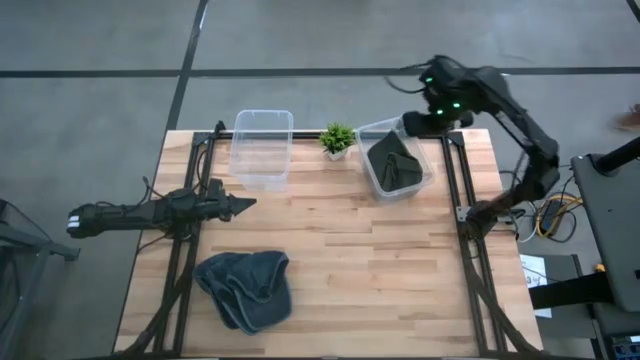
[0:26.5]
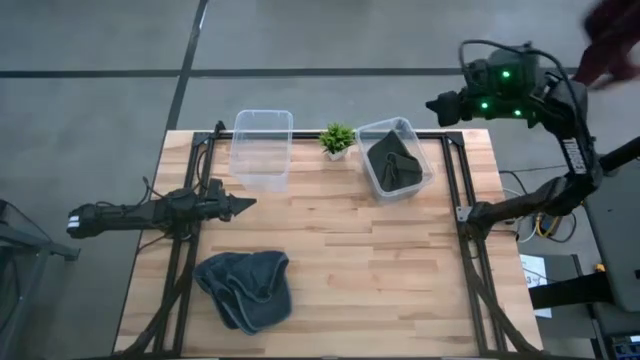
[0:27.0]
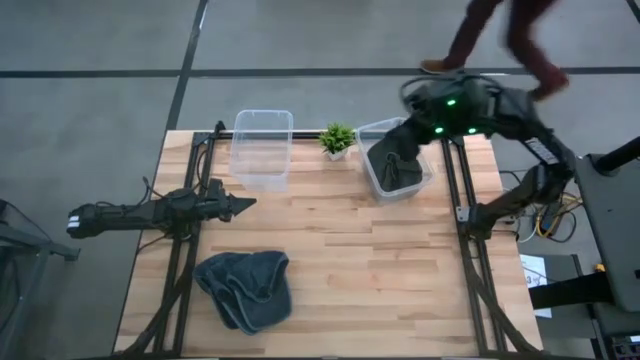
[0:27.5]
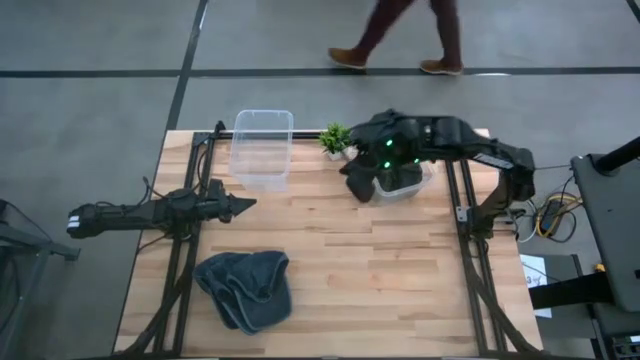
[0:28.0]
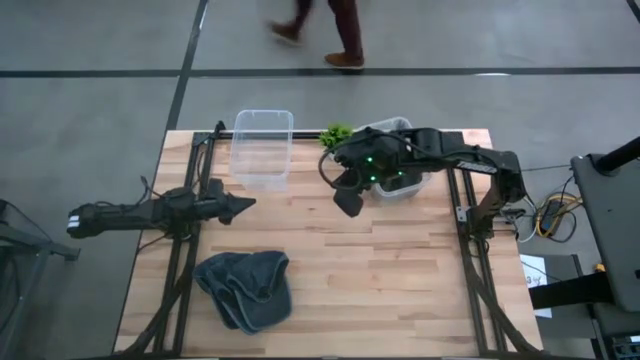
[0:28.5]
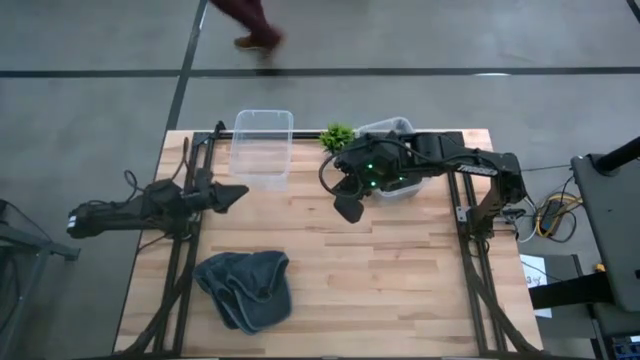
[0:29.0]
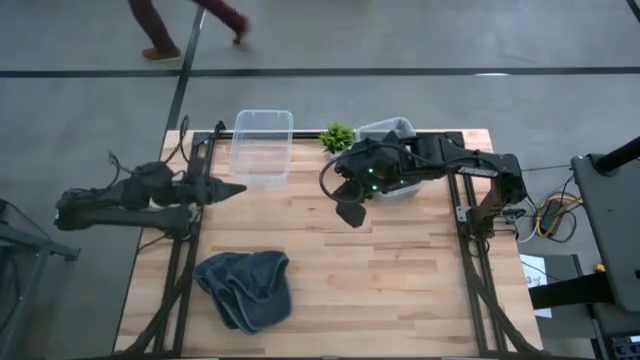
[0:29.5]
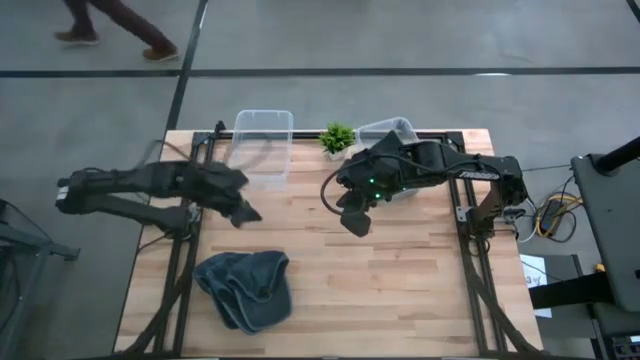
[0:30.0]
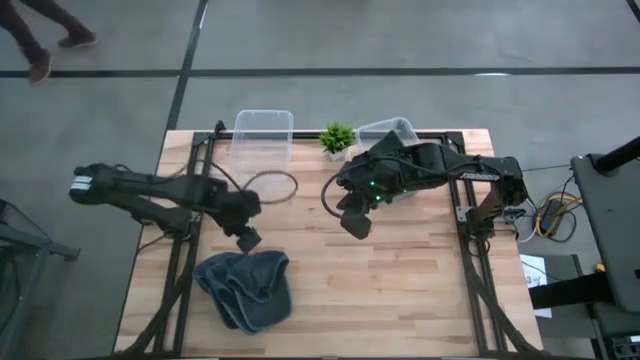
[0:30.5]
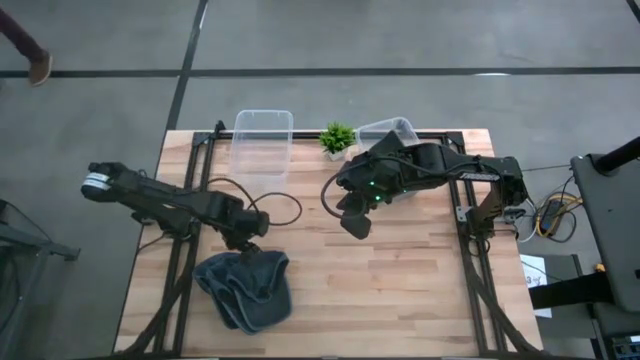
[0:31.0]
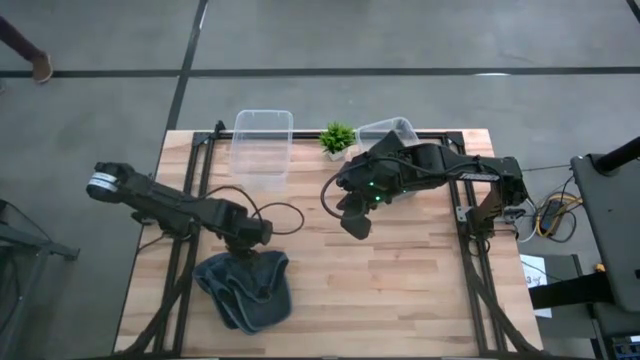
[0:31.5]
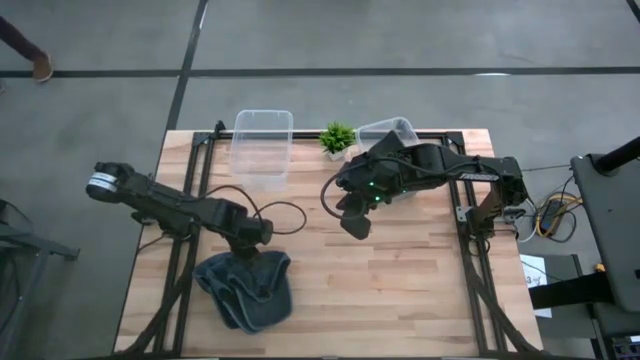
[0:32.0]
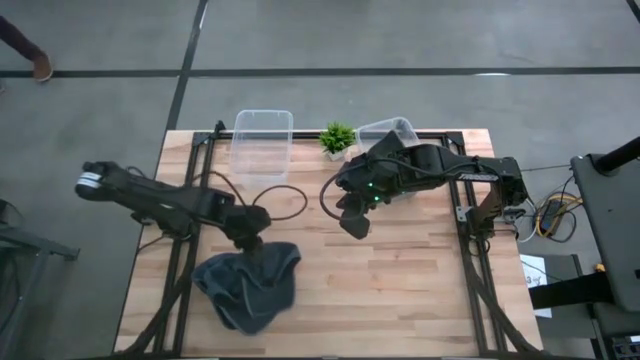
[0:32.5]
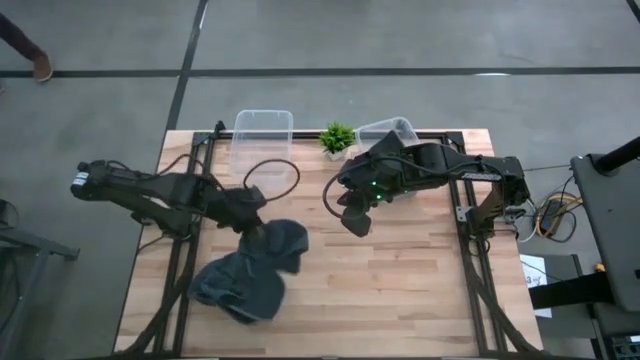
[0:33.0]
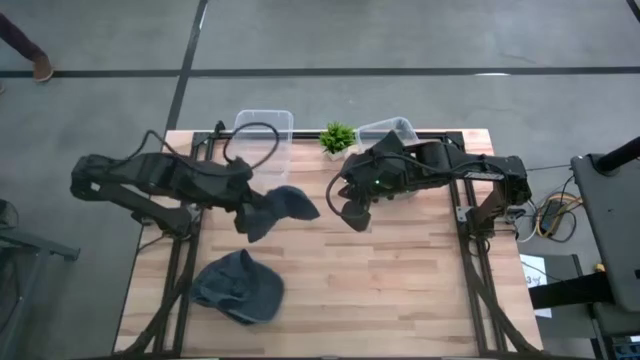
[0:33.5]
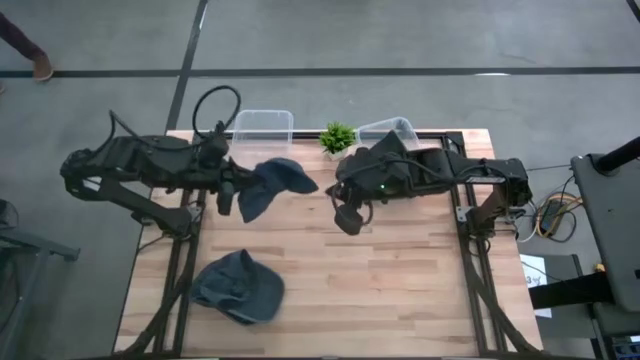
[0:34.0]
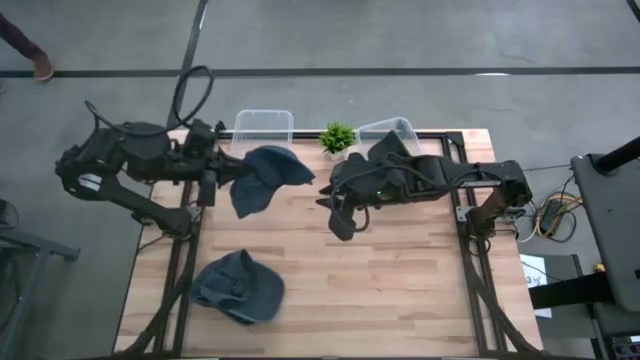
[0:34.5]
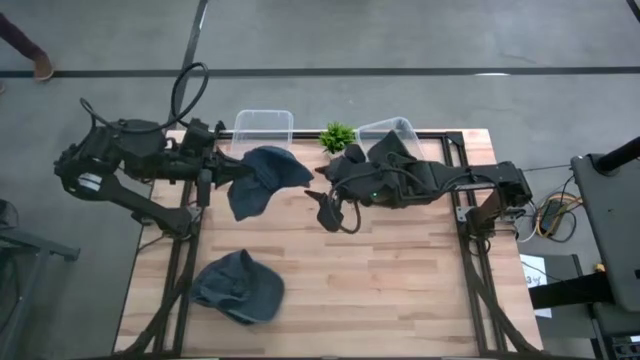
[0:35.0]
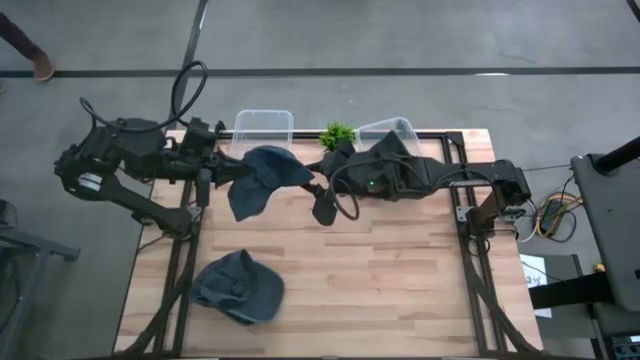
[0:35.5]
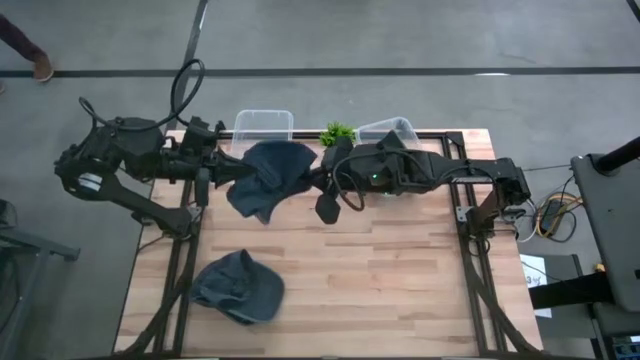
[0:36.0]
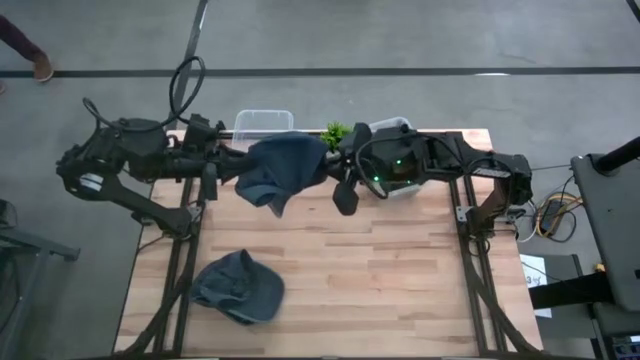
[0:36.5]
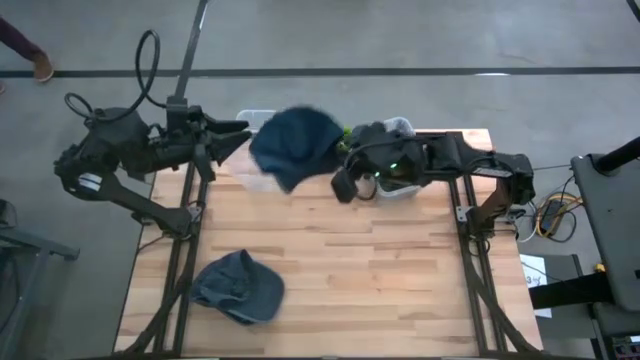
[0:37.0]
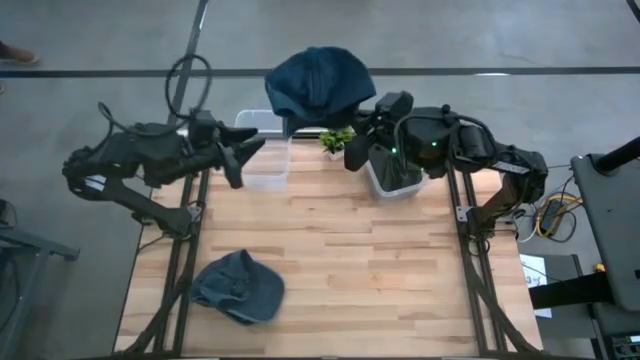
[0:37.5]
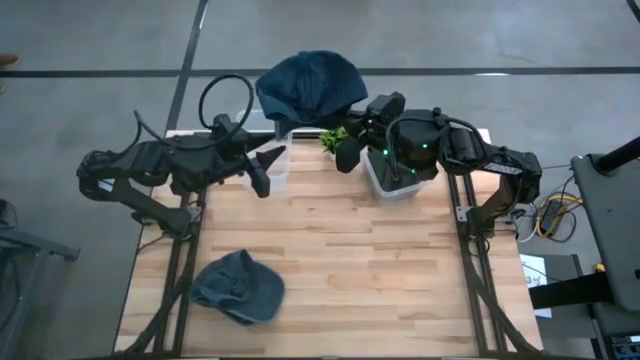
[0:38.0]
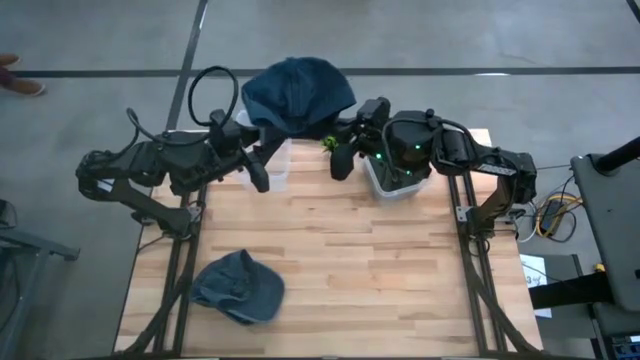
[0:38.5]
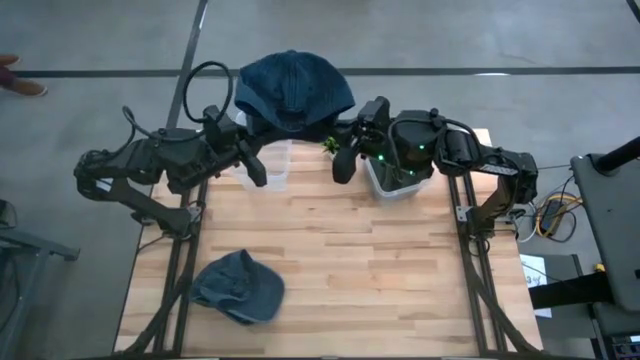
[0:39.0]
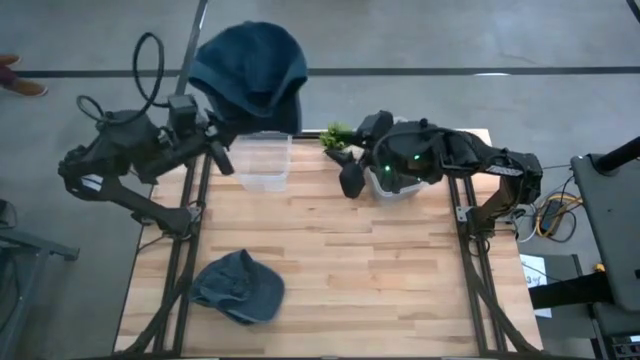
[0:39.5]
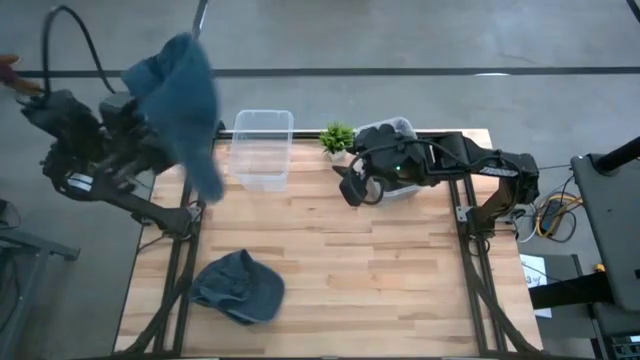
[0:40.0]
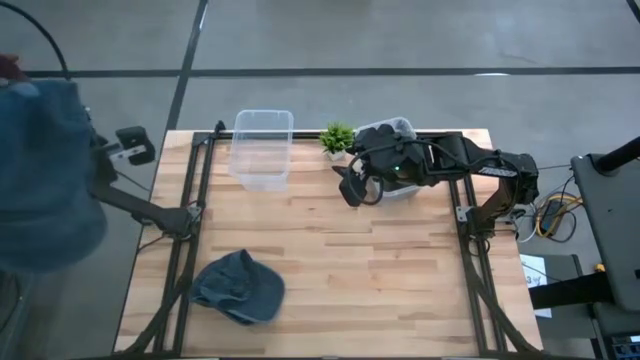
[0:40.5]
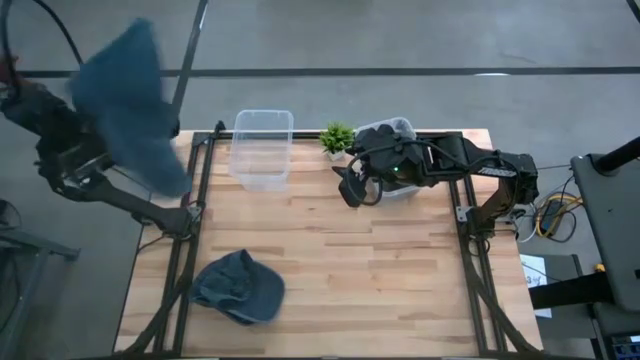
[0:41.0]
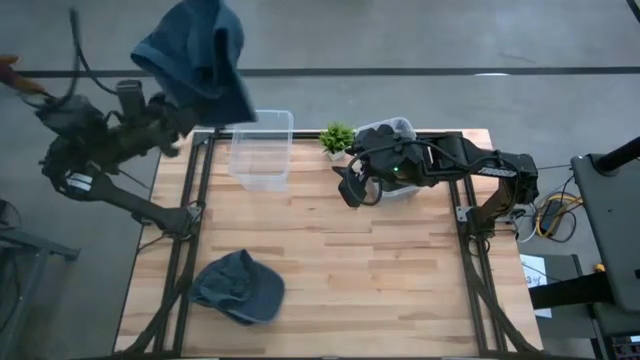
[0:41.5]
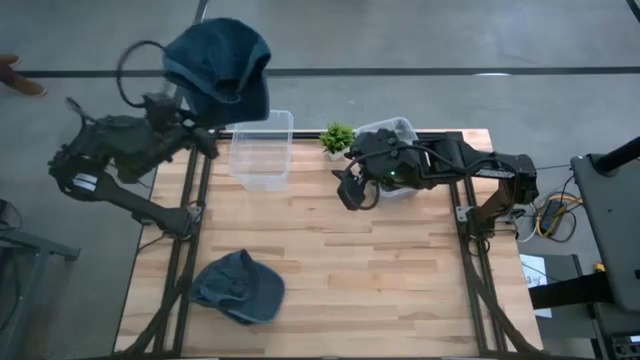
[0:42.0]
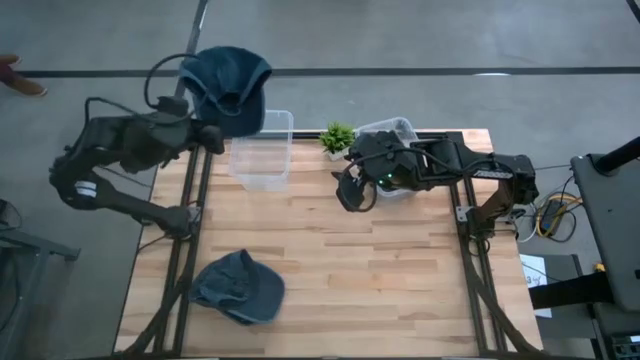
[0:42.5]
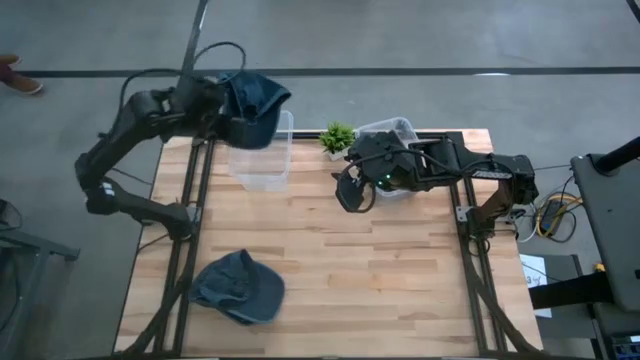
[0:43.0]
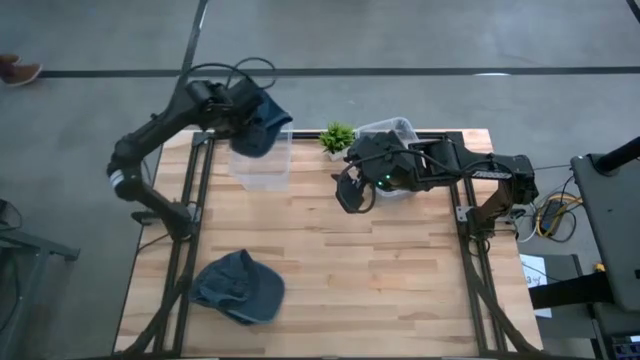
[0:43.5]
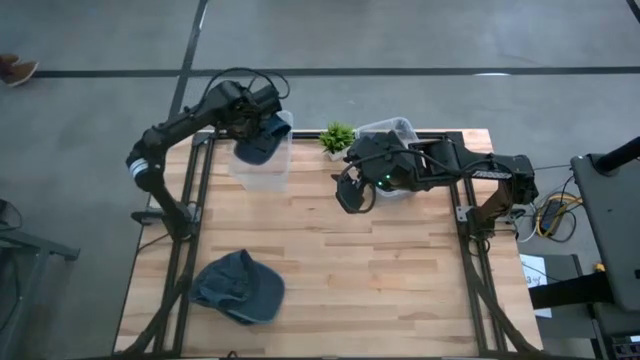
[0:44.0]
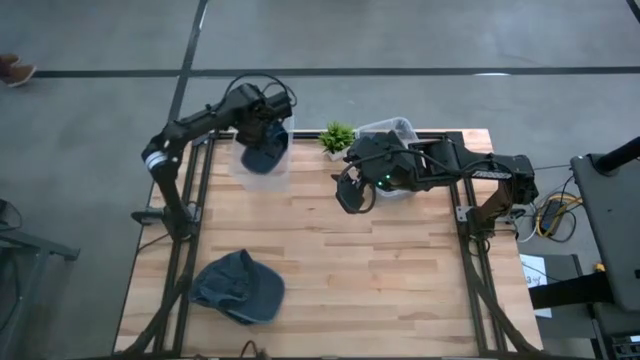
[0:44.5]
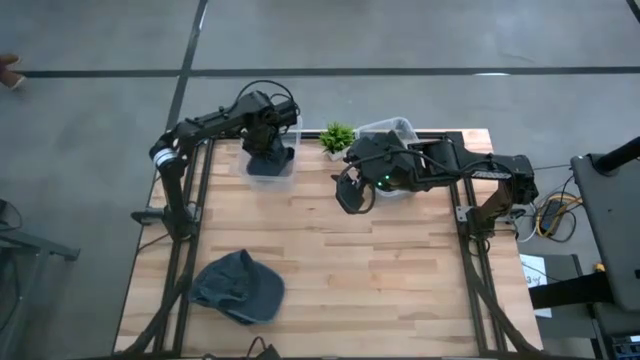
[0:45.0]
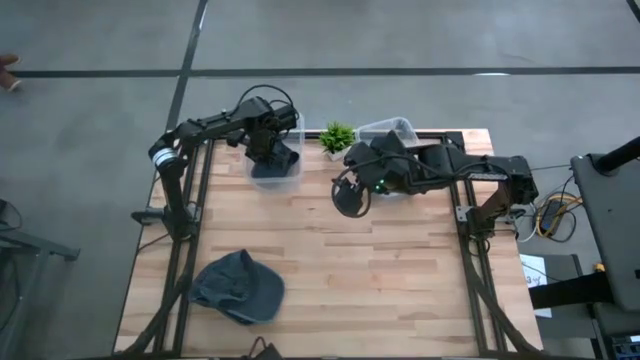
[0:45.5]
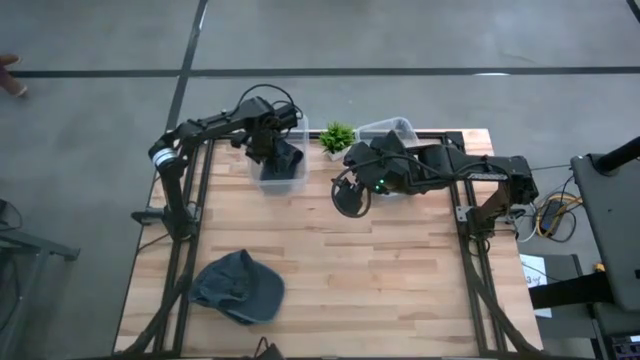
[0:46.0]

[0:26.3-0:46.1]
Task: Pick & Place hat
Put the right blue cap into the left transparent bin

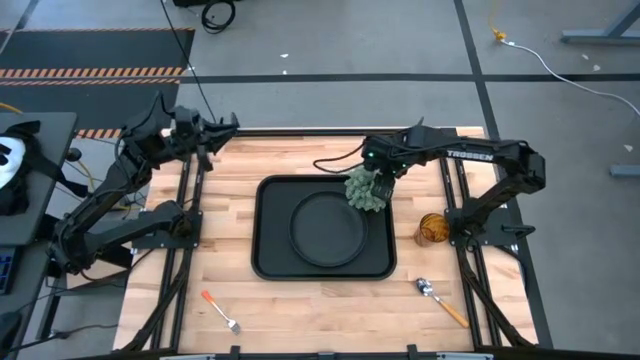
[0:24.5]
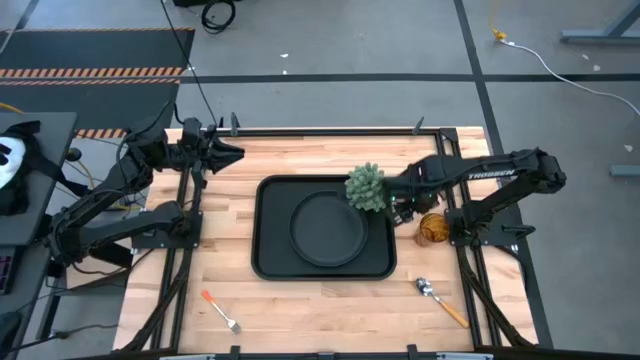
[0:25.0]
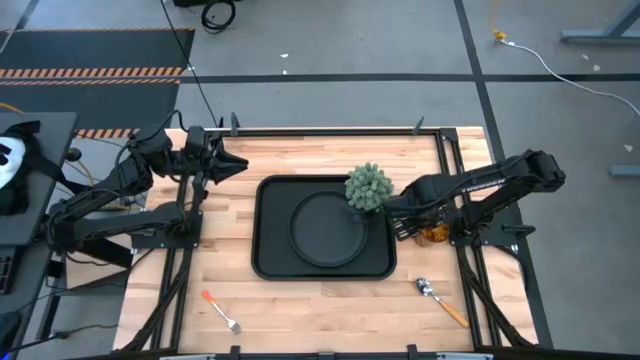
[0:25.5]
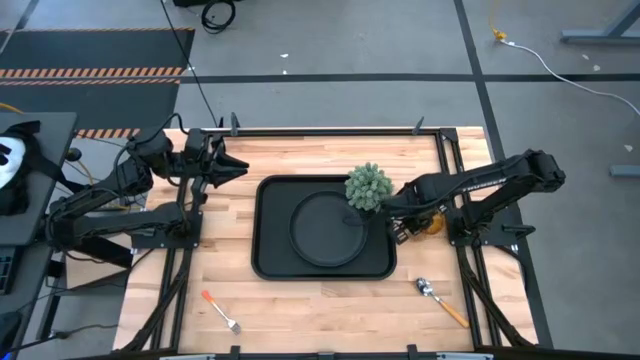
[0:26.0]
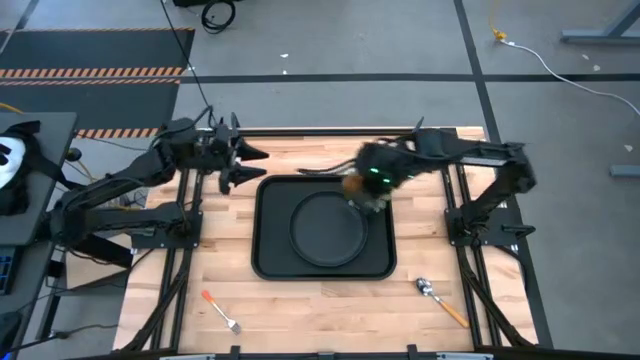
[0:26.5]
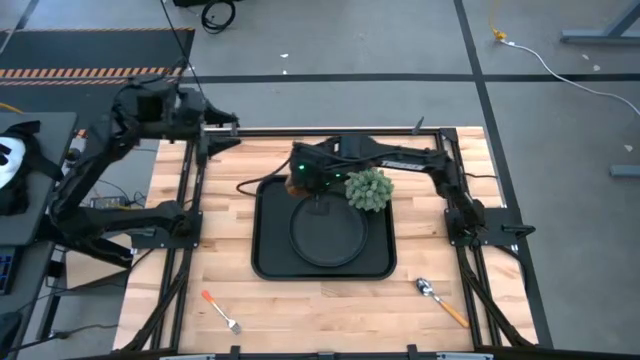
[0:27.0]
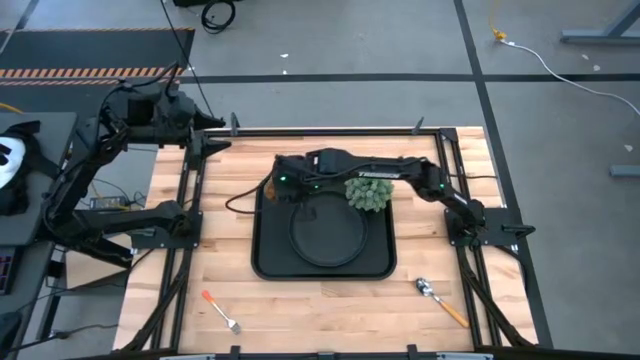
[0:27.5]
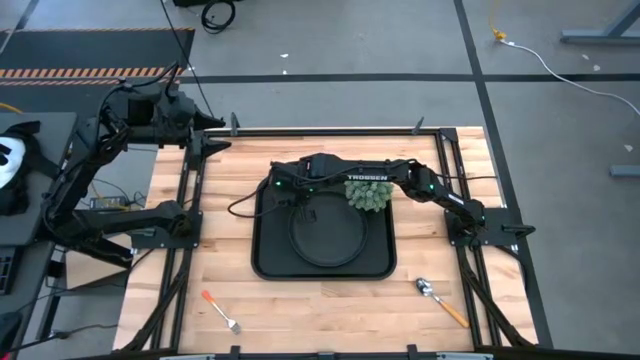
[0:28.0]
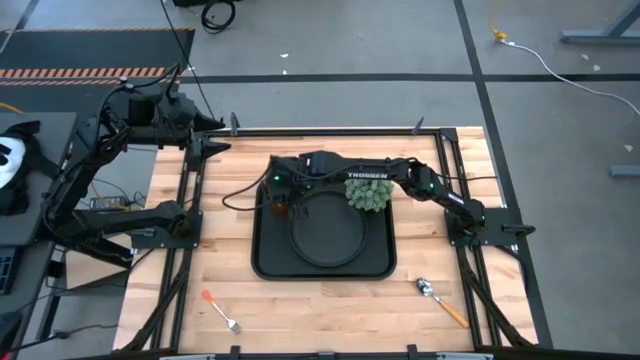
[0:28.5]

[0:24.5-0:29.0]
Task: Pick and place plate/cup/fork/spoon on tray
Put the brown cup on the black serving tray to the top left of the black plate
